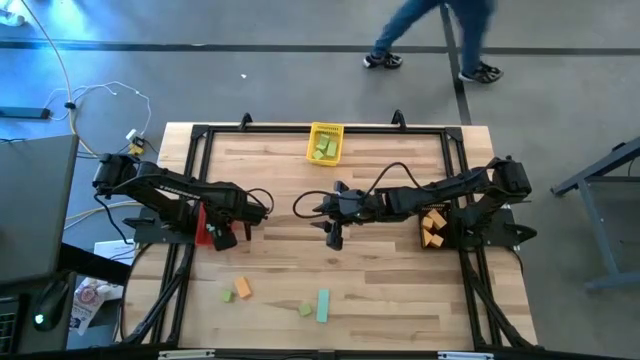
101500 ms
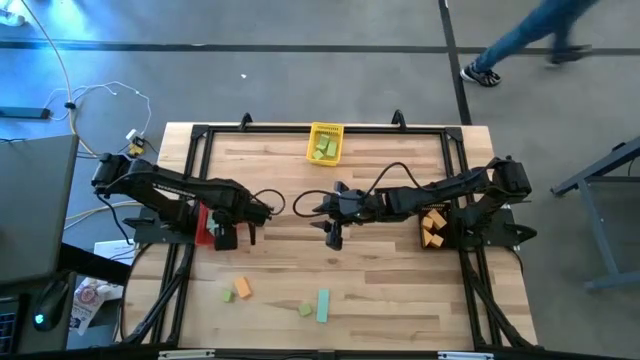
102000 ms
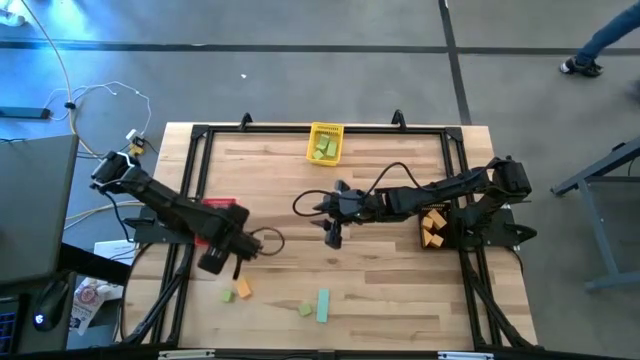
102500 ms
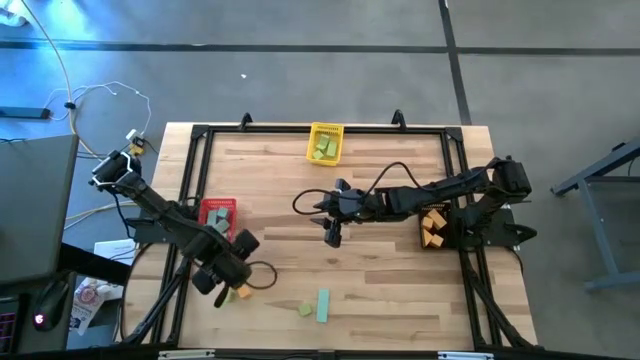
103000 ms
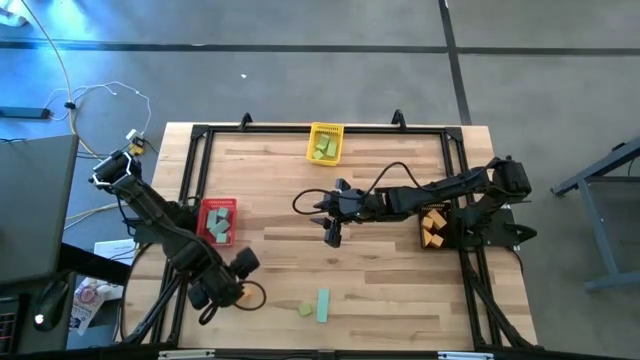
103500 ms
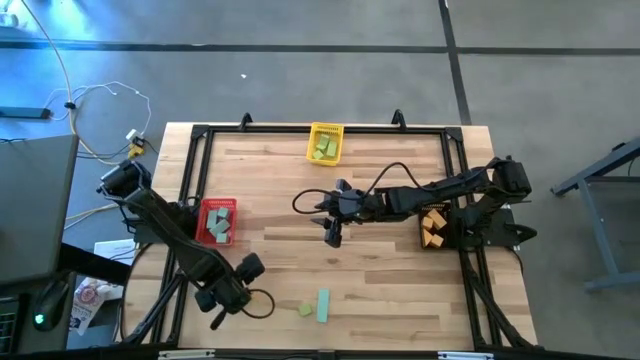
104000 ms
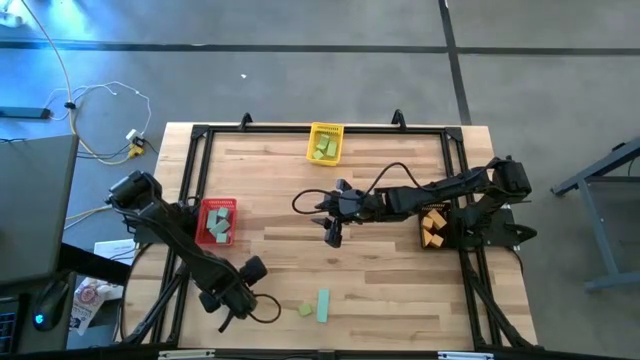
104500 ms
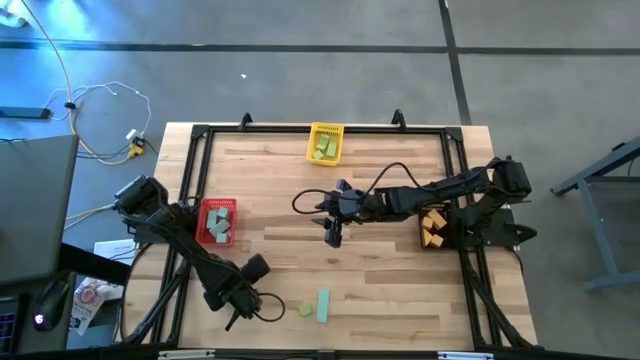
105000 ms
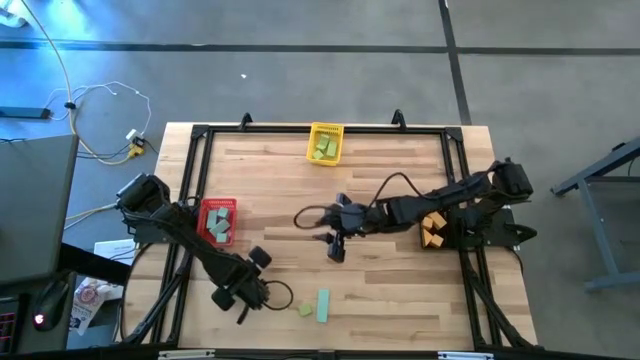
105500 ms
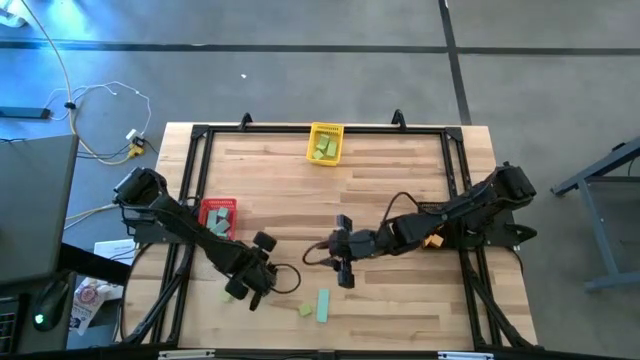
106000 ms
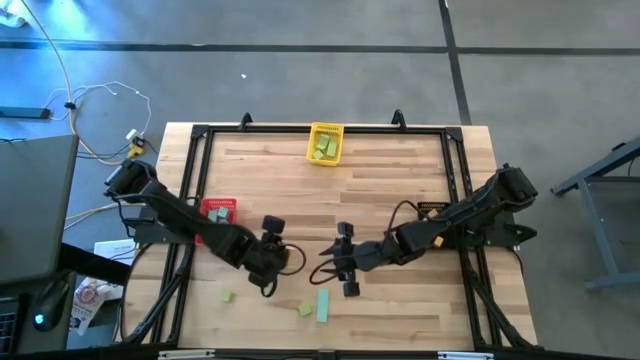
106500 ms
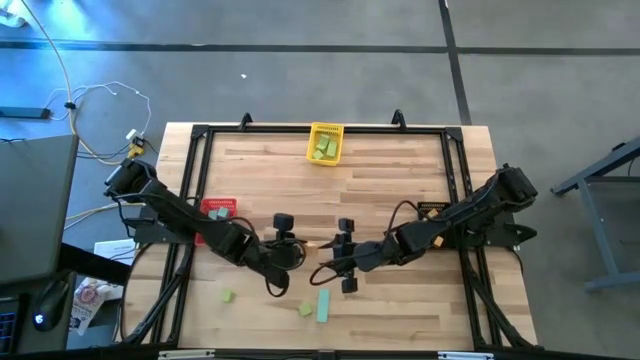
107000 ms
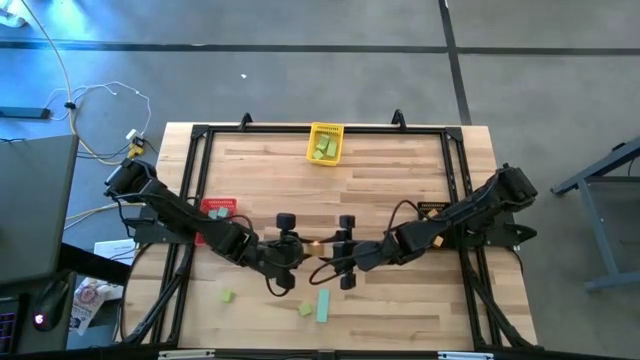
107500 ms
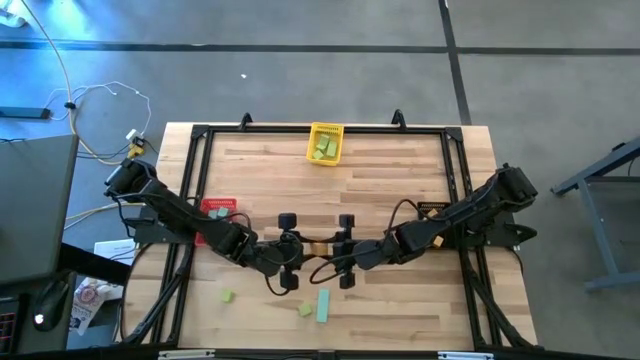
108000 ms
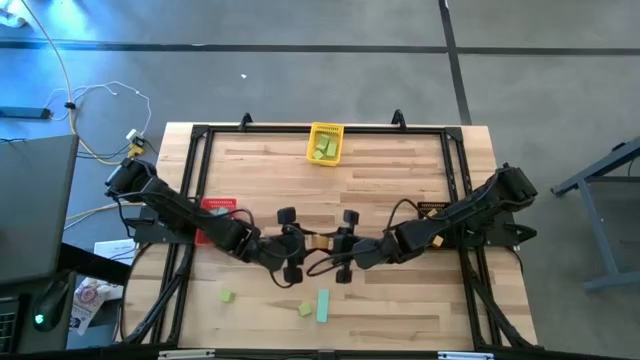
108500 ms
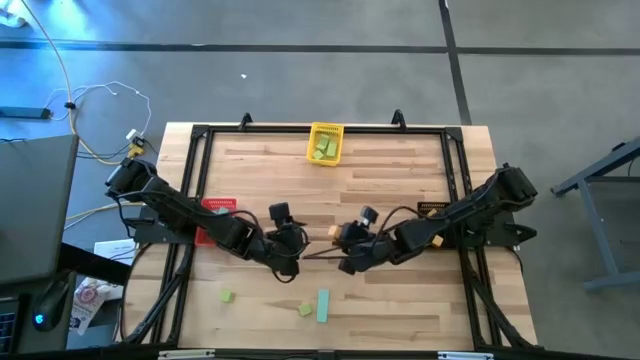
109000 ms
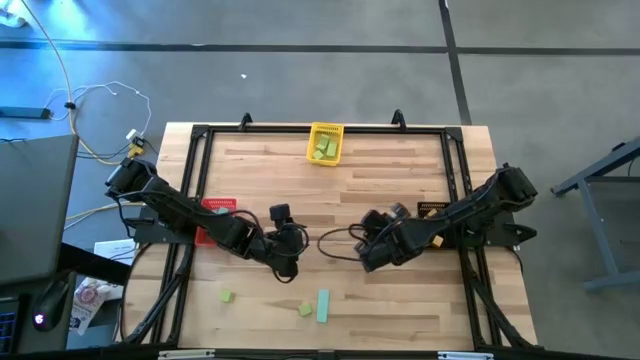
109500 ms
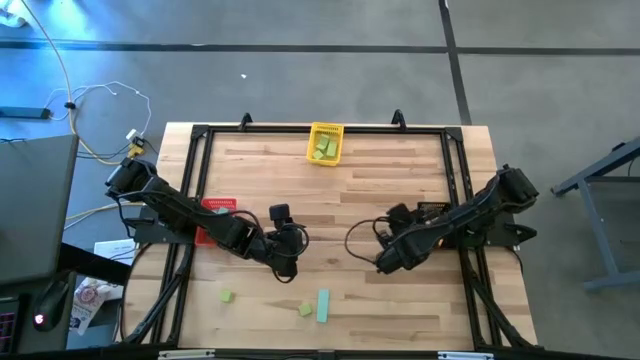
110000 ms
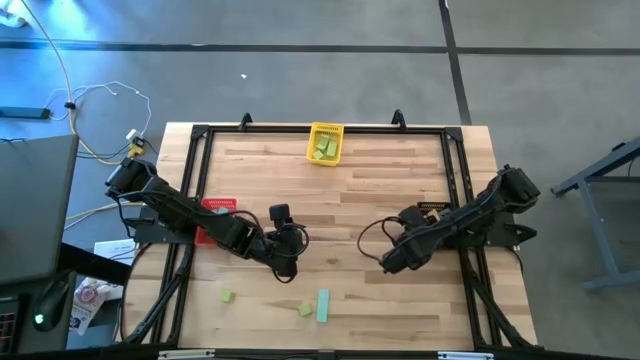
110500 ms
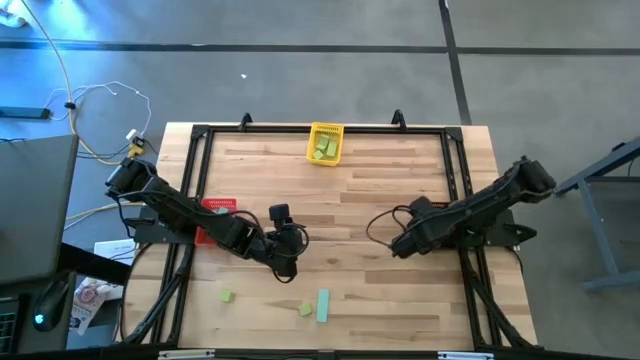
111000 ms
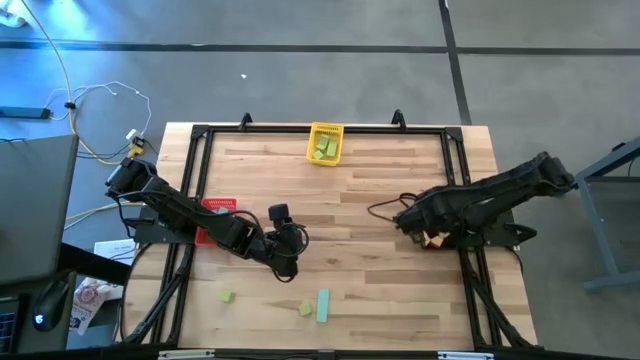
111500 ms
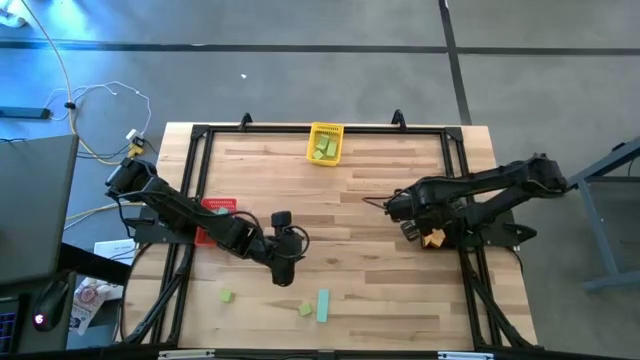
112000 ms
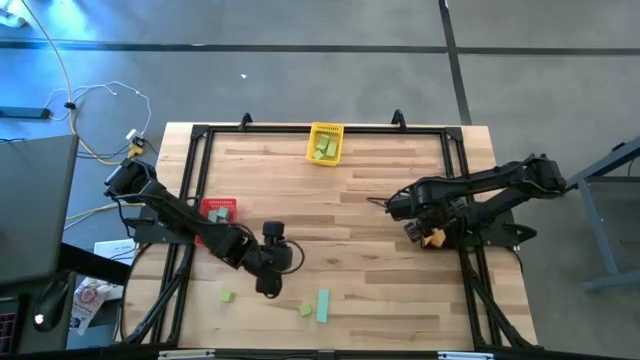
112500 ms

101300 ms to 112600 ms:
Task: Sort & place blocks by color
Put the orange block into the black bin

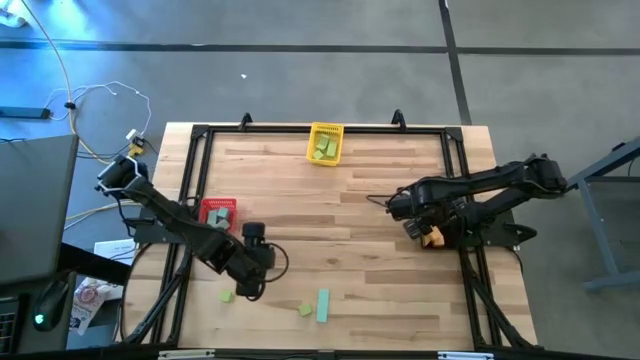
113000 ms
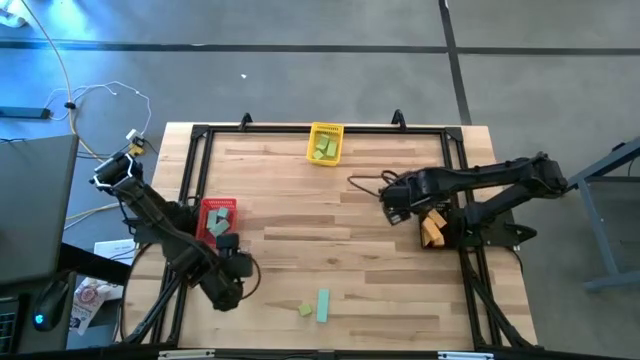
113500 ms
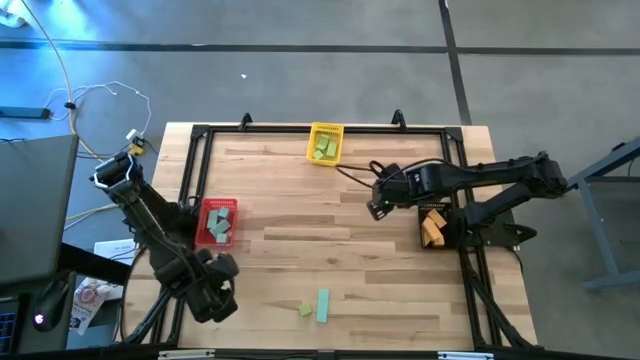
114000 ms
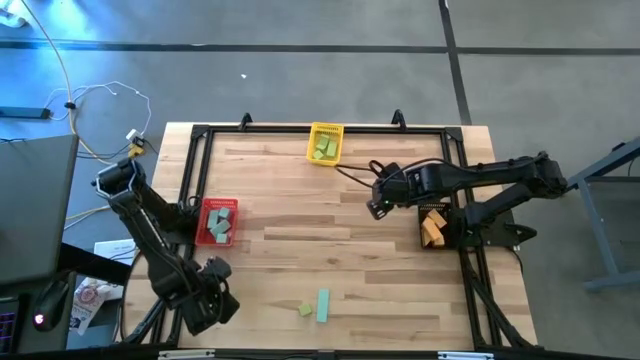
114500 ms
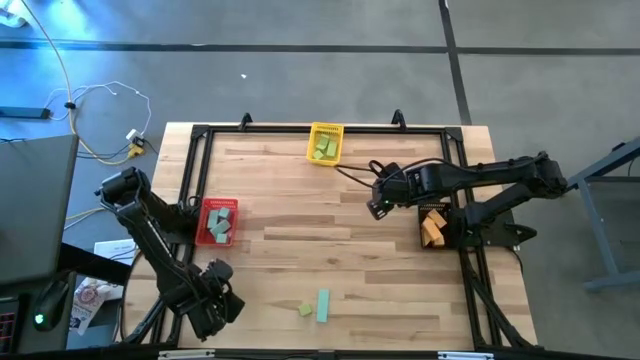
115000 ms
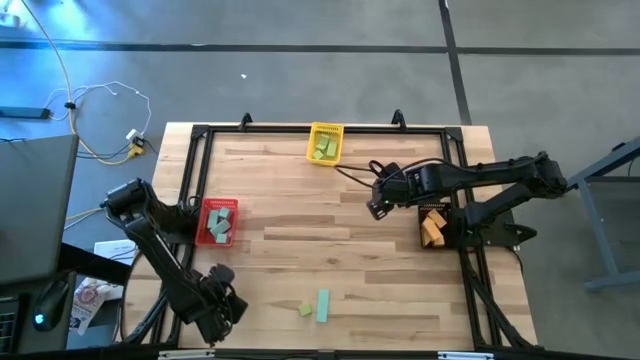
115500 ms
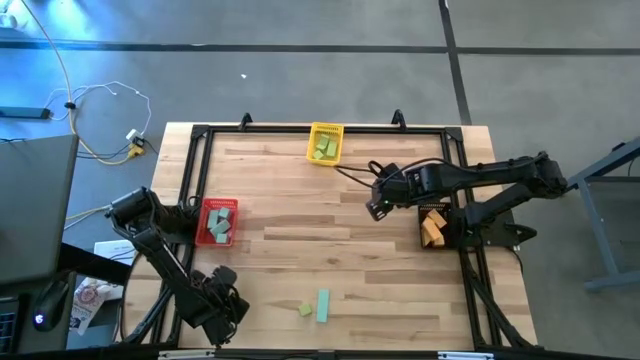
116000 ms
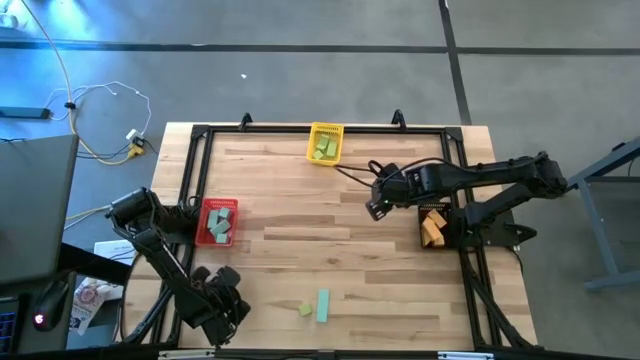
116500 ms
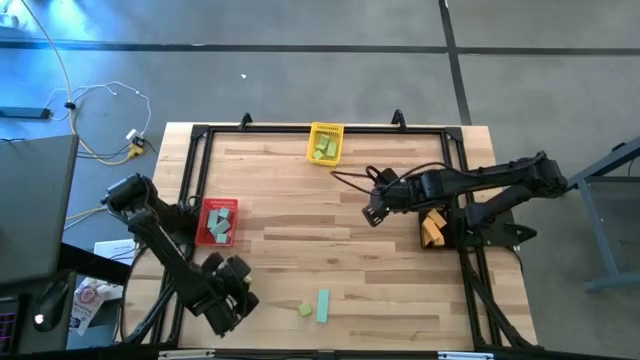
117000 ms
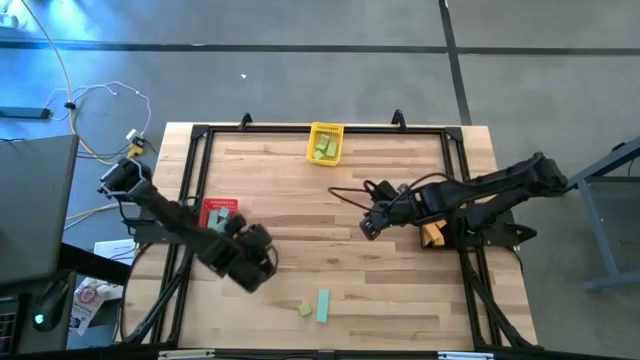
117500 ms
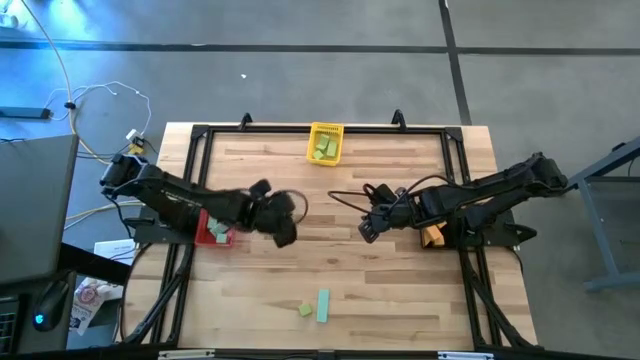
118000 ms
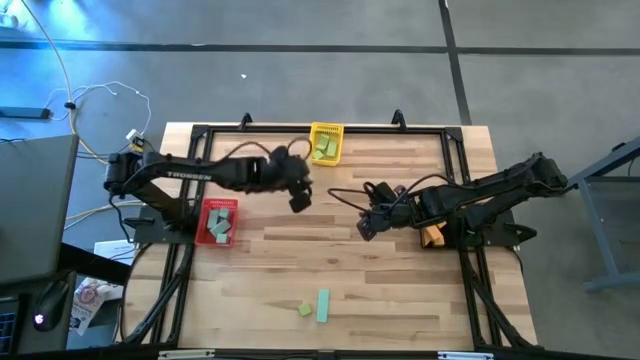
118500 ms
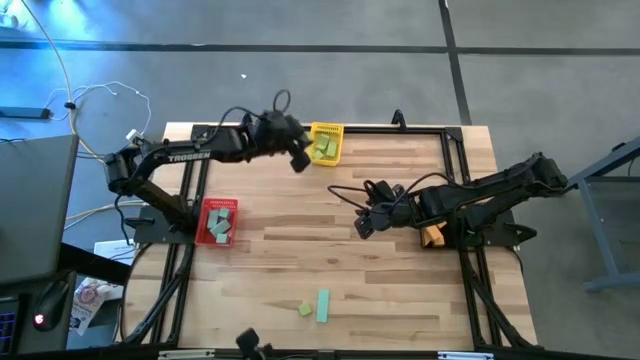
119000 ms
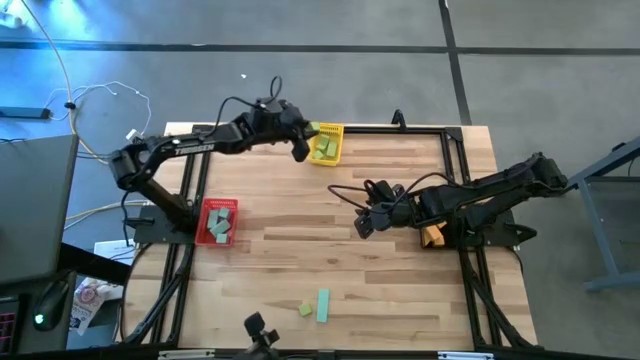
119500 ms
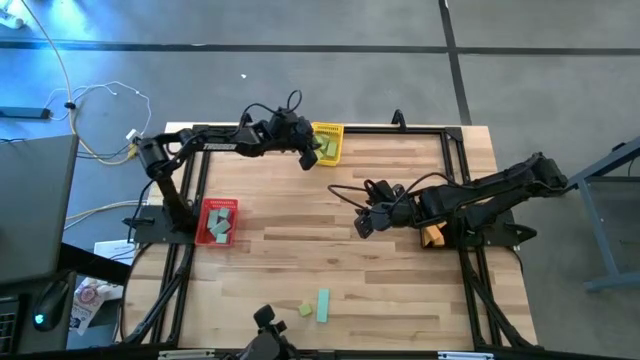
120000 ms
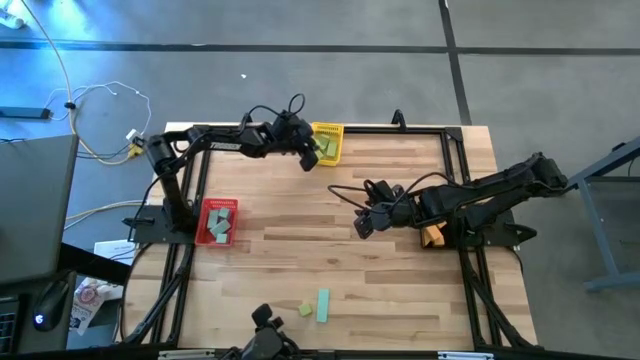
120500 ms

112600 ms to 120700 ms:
Put the green block into the yellow bin

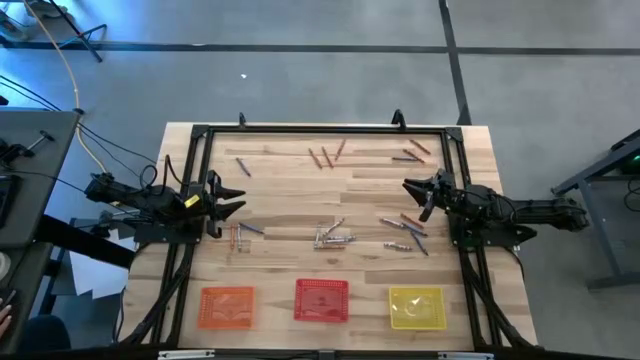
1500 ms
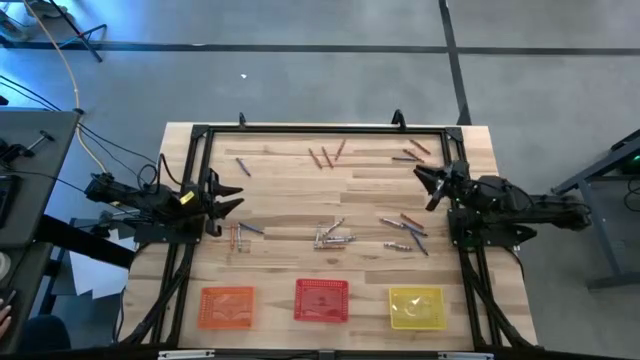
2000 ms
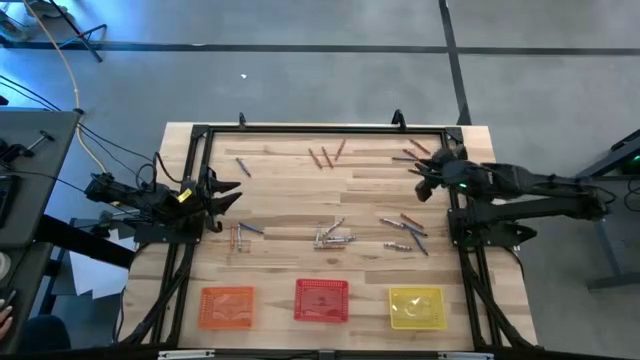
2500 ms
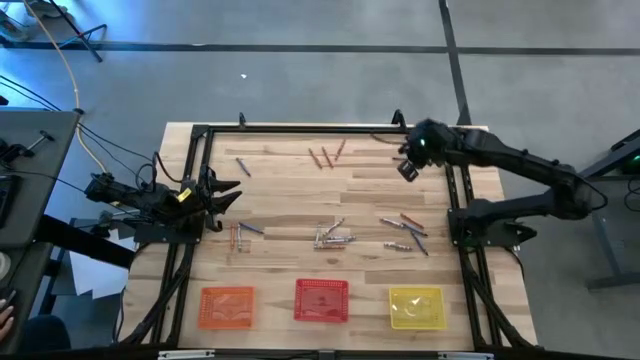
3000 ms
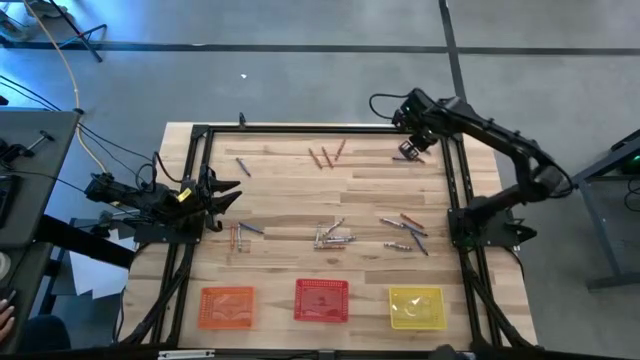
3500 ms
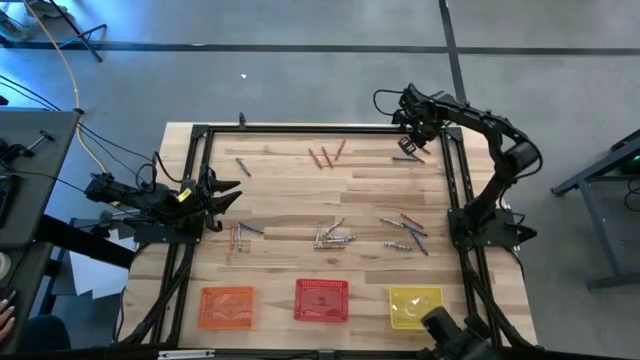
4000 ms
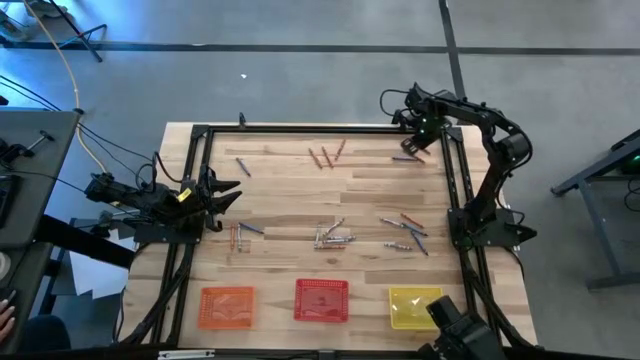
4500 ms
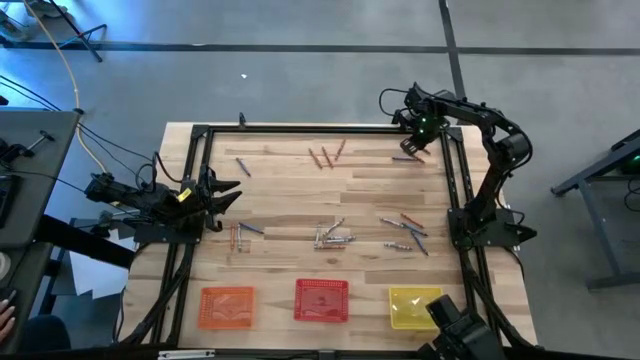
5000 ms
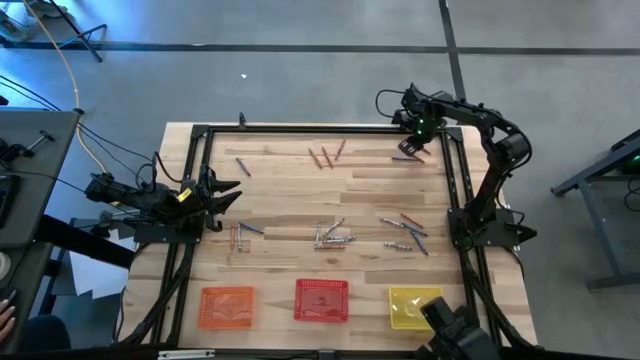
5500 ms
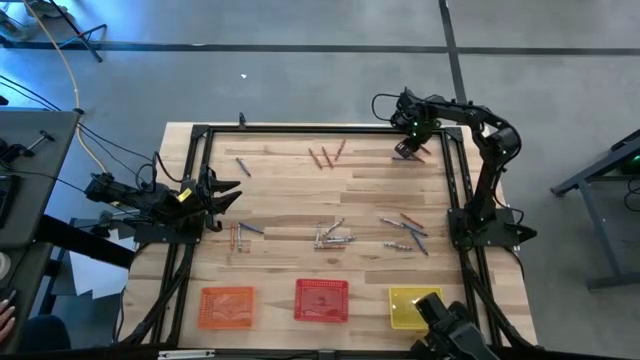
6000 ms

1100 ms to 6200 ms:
Task: Sort crayons
Put the orange crayon into the yellow bin
